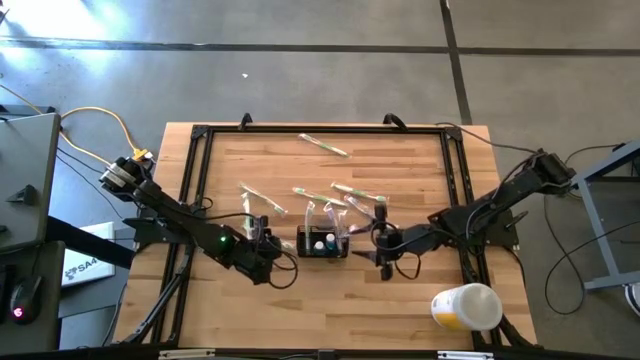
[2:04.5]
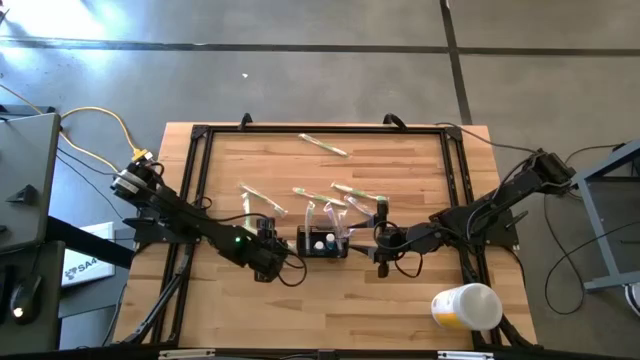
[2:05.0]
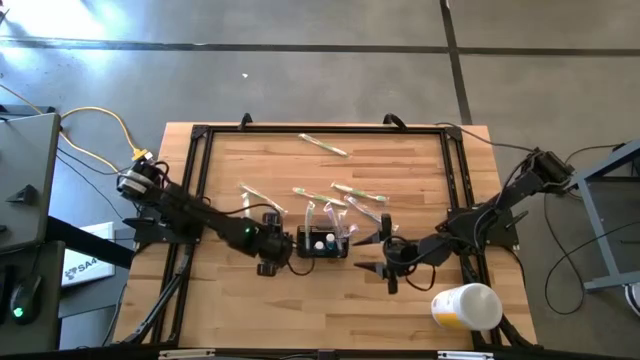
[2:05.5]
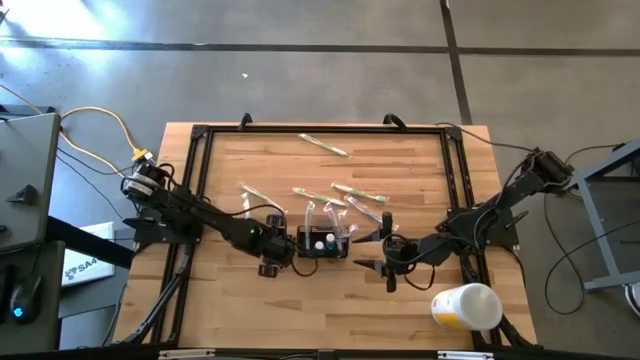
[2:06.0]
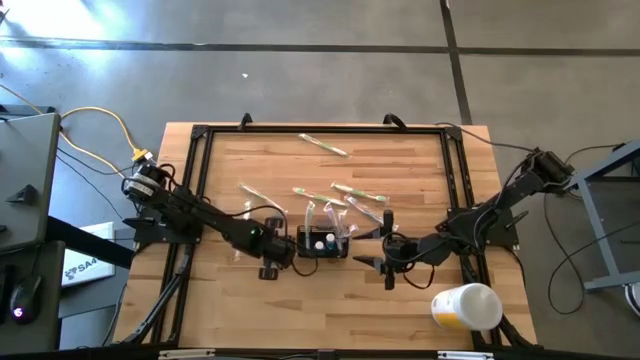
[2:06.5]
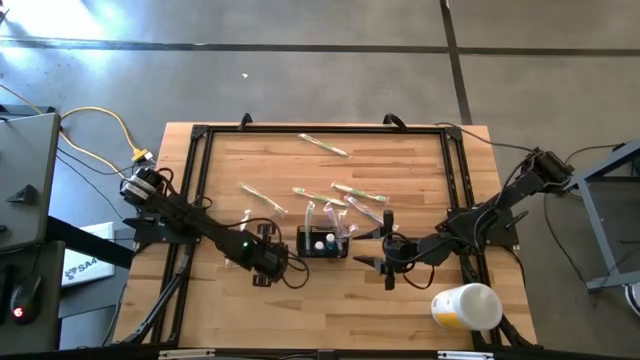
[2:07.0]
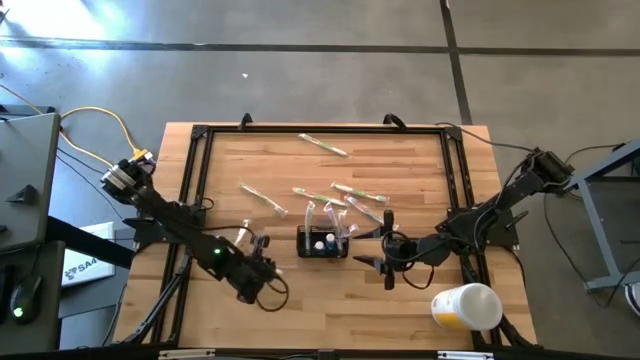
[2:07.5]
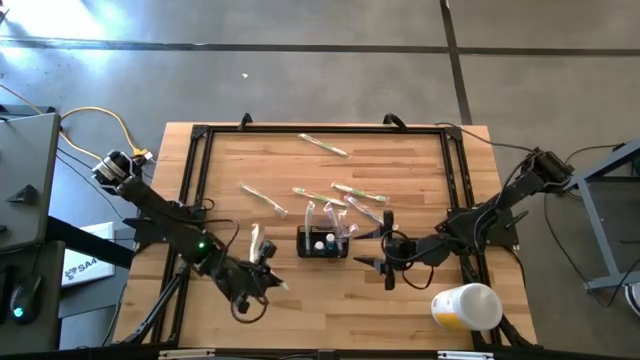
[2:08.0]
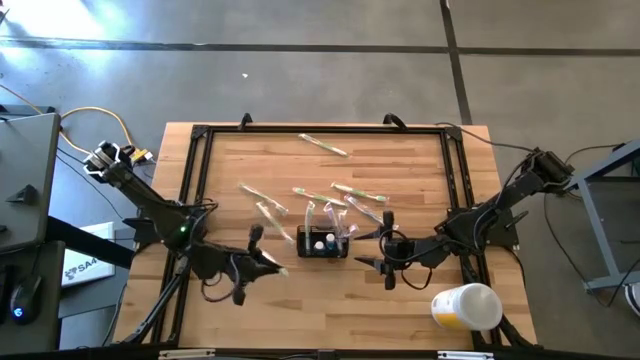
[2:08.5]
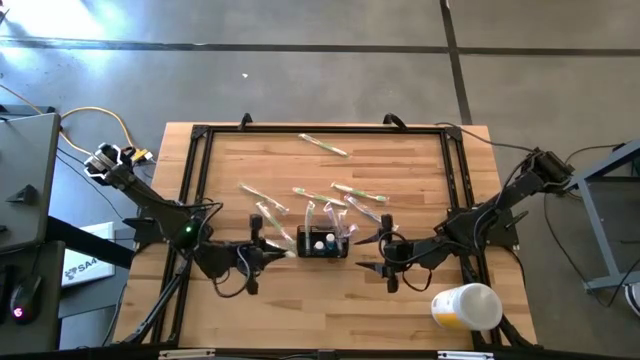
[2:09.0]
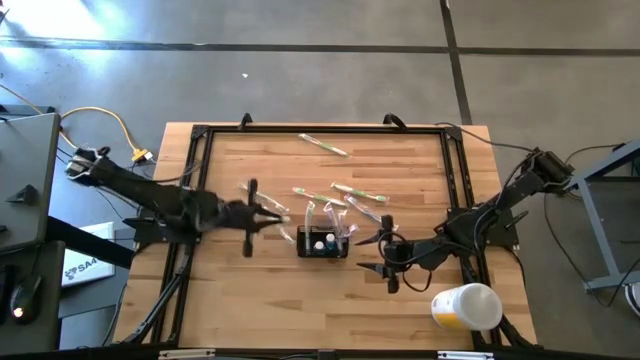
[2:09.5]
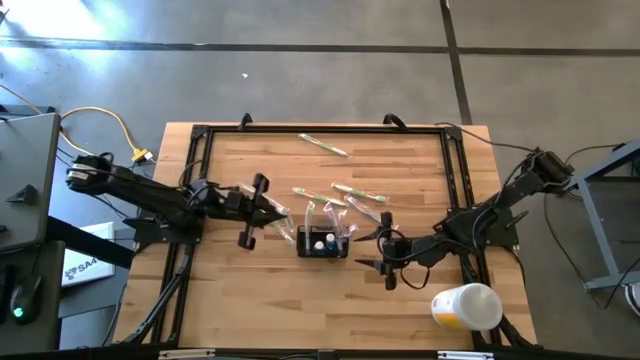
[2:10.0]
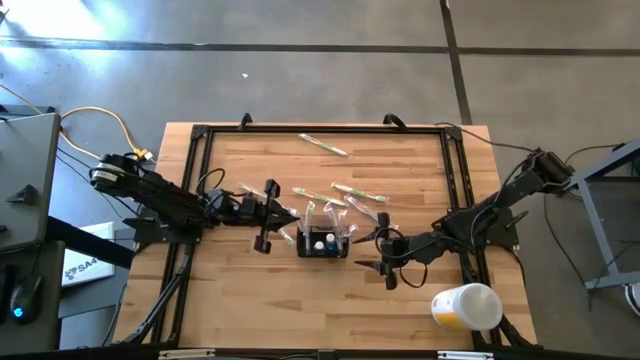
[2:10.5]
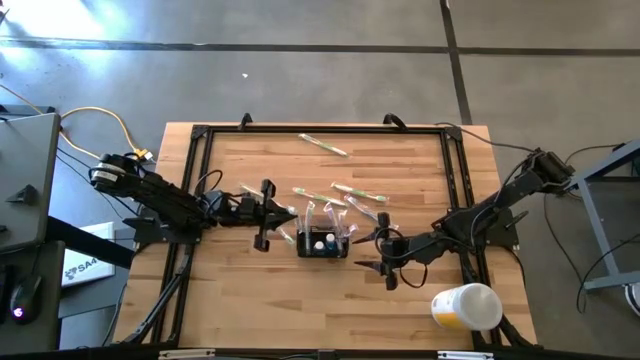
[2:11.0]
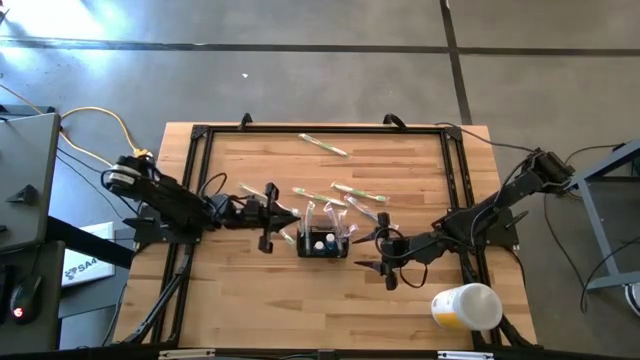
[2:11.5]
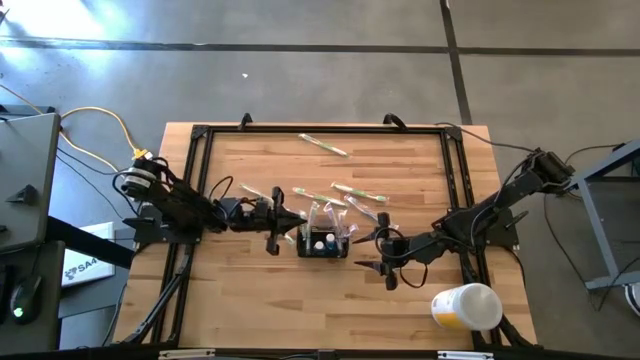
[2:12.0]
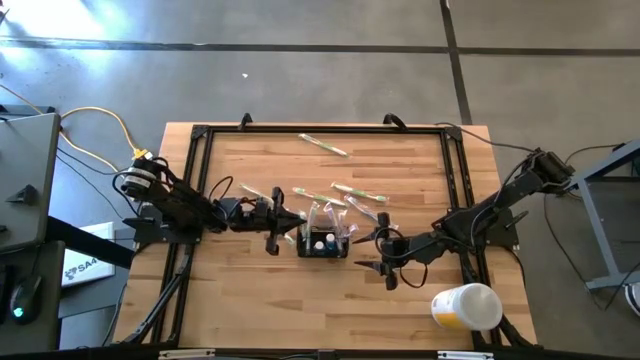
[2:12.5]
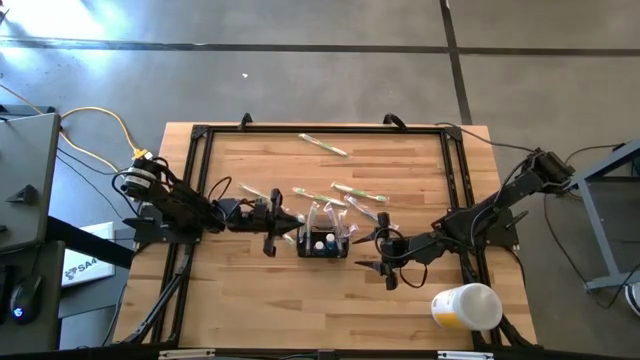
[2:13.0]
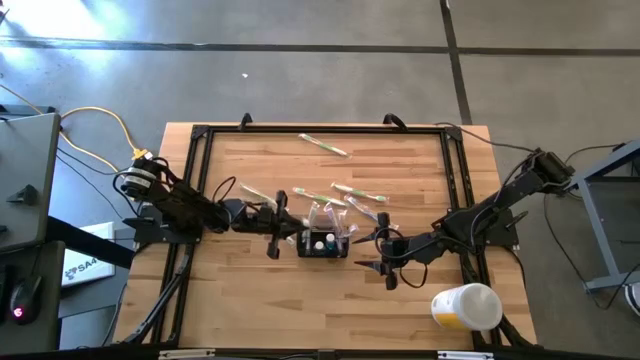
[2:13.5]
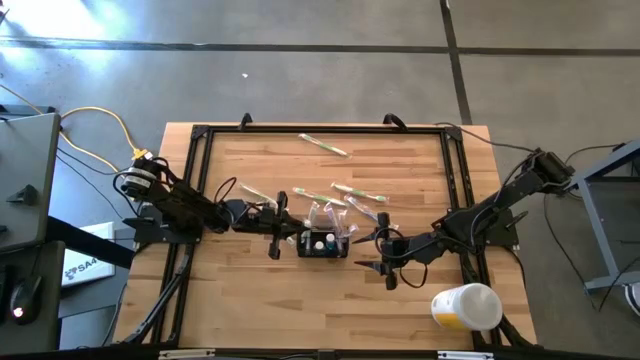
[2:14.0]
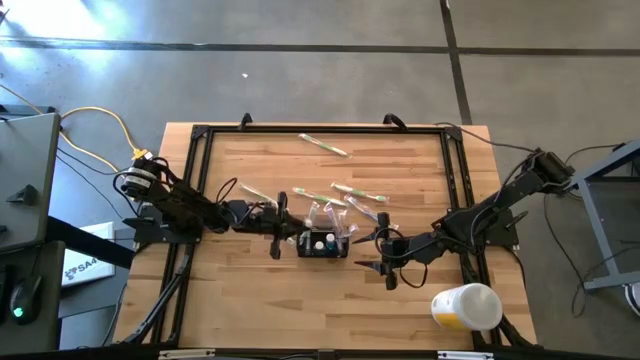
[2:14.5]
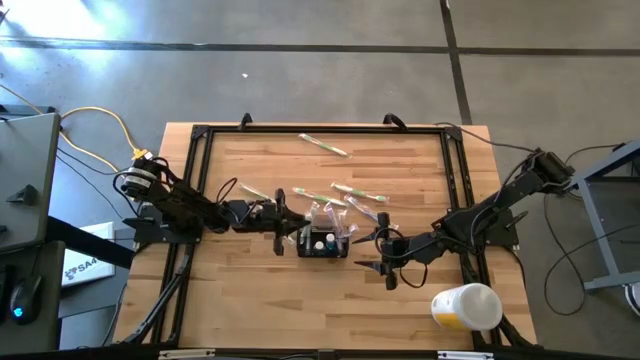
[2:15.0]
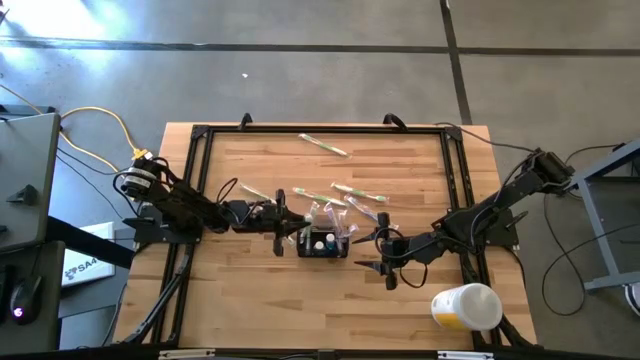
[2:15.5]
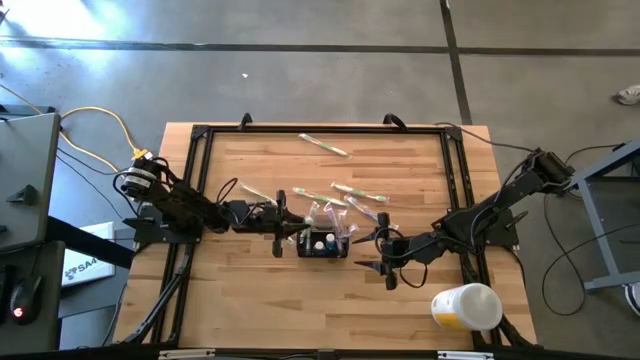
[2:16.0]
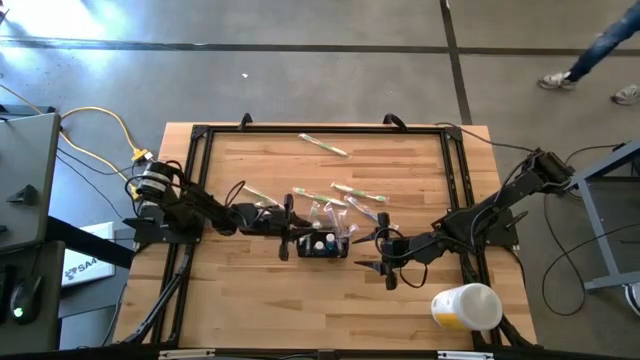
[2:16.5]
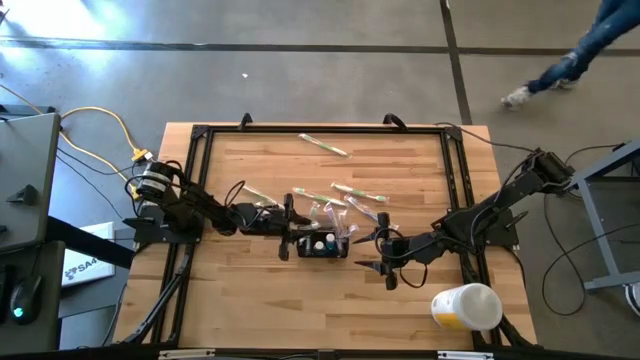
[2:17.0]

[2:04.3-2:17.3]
Task: Pick & Place toothbrushing station
Put the green toothbrush into the wire organizer

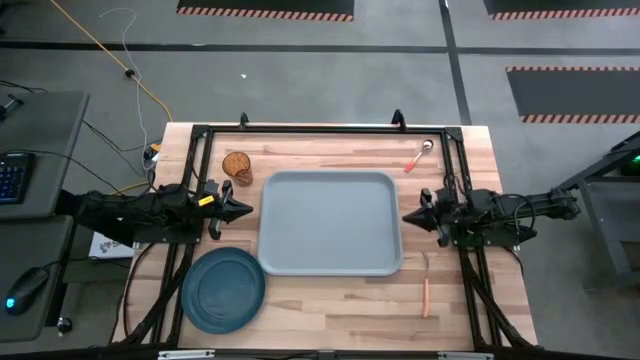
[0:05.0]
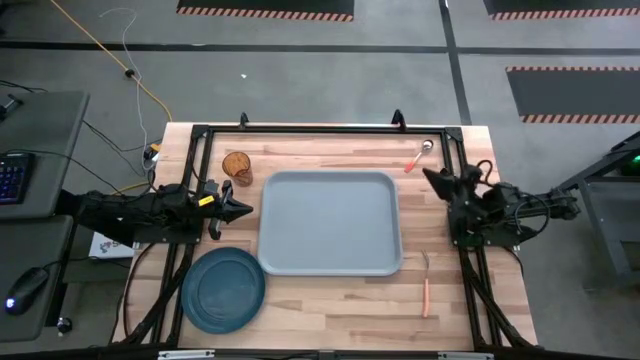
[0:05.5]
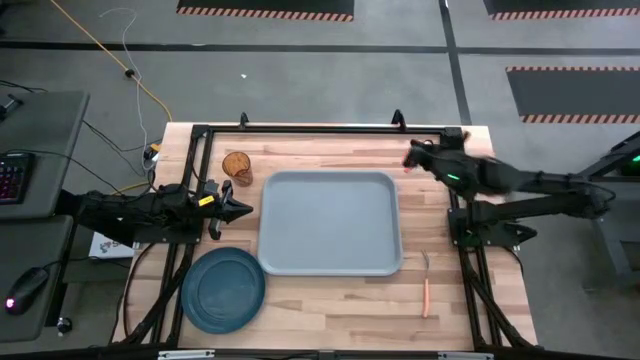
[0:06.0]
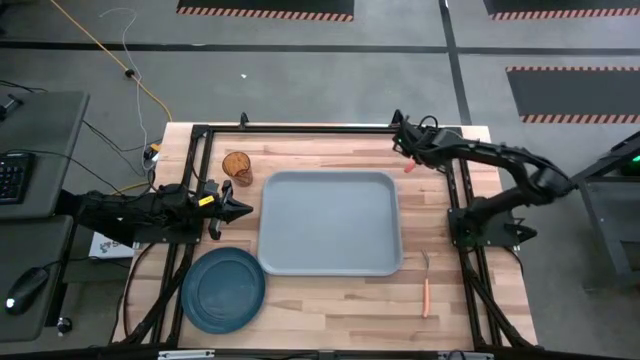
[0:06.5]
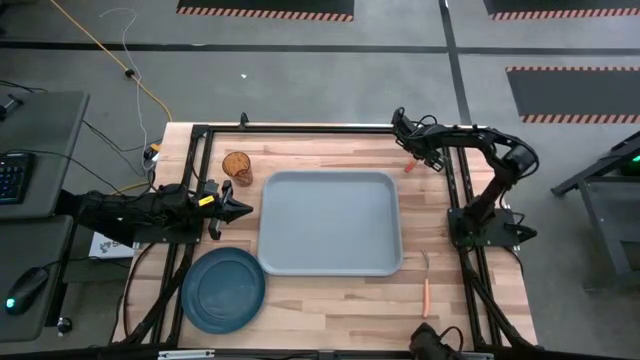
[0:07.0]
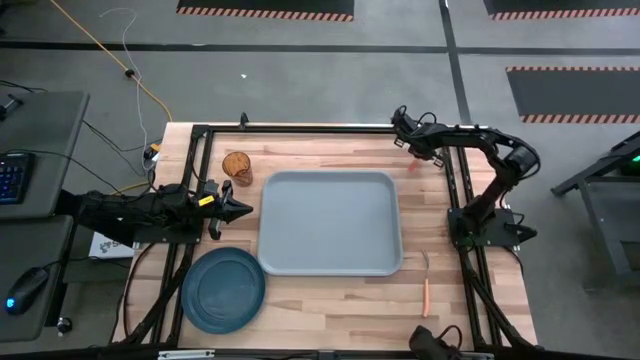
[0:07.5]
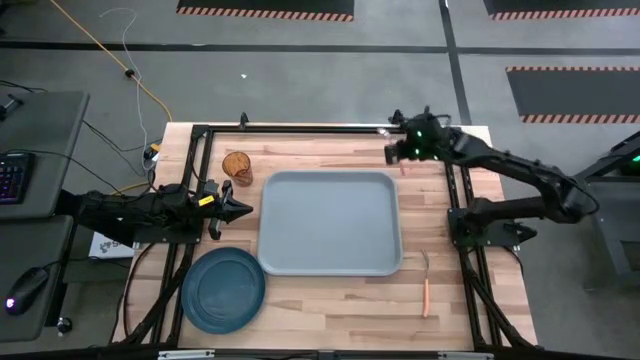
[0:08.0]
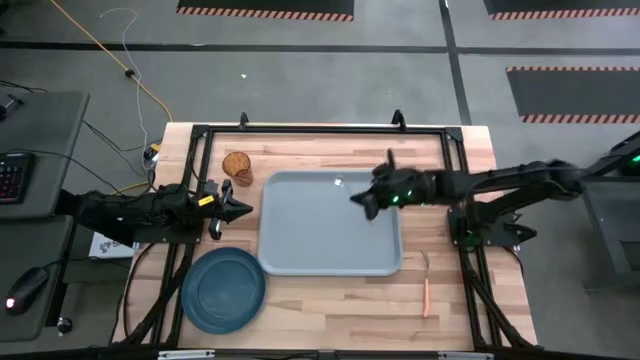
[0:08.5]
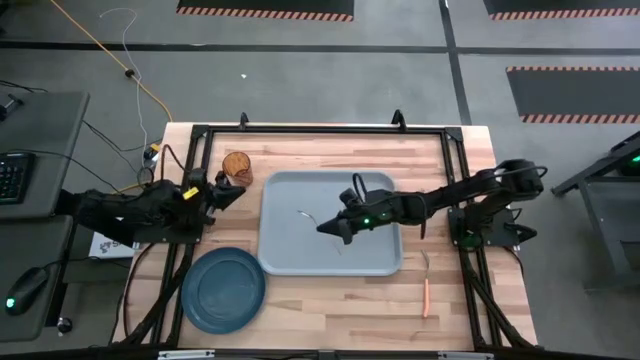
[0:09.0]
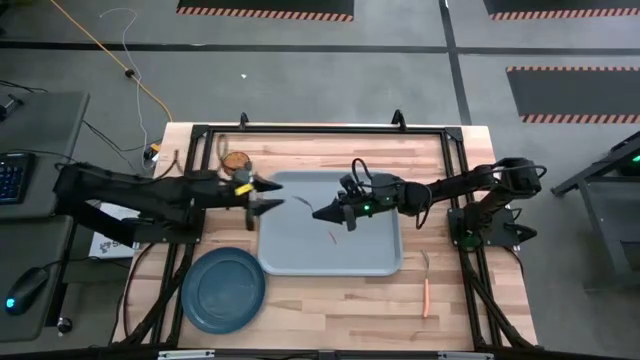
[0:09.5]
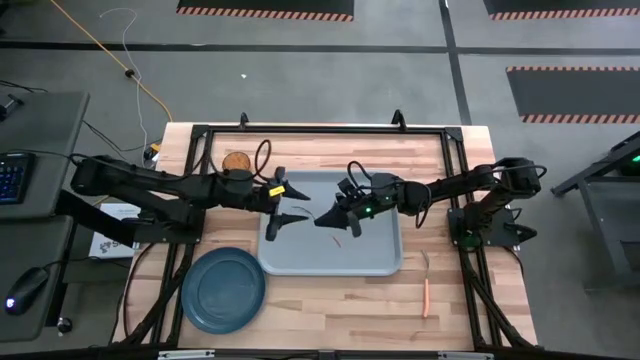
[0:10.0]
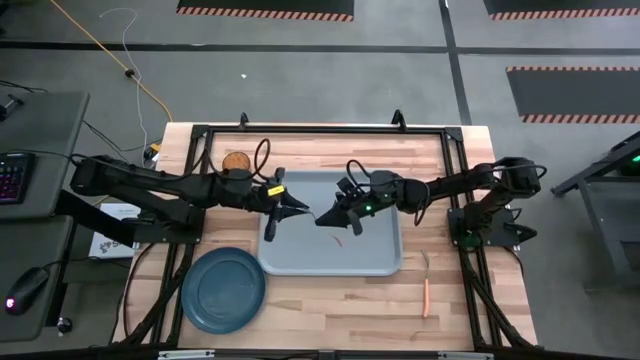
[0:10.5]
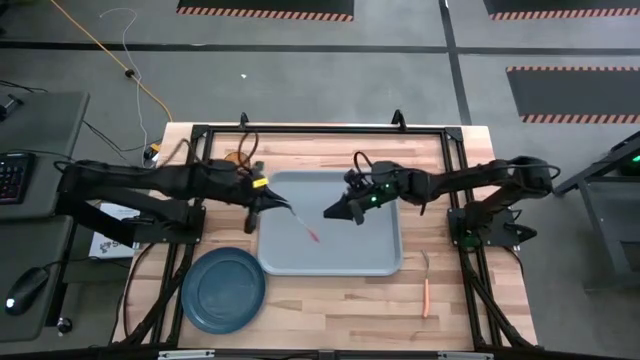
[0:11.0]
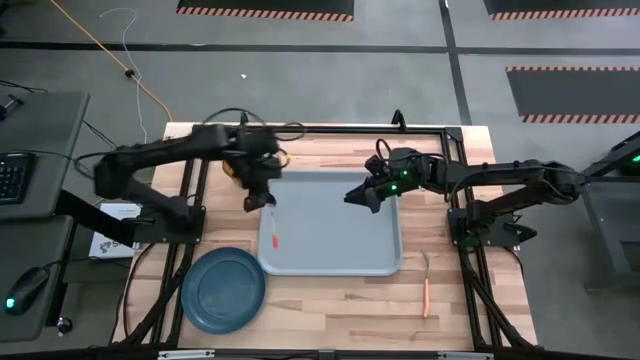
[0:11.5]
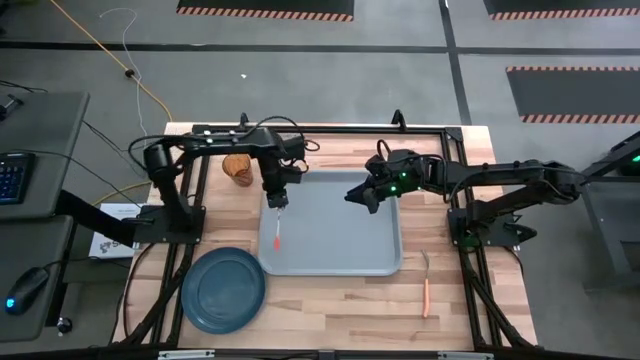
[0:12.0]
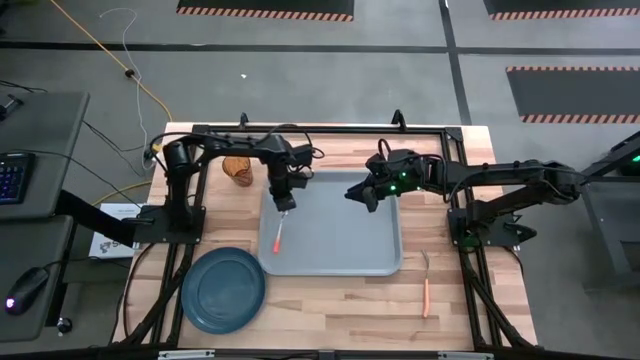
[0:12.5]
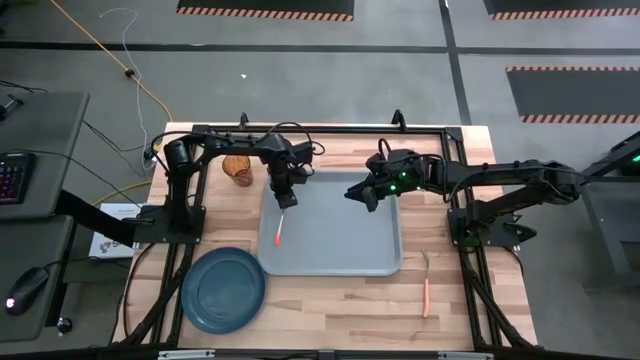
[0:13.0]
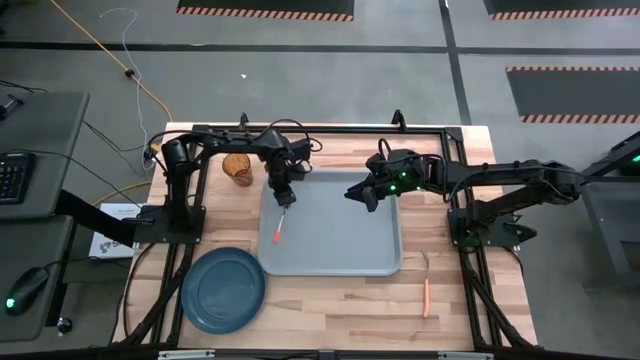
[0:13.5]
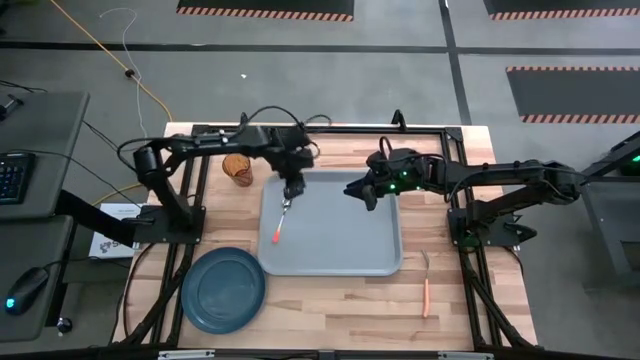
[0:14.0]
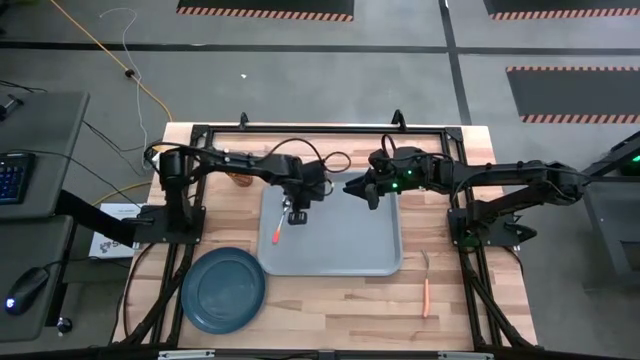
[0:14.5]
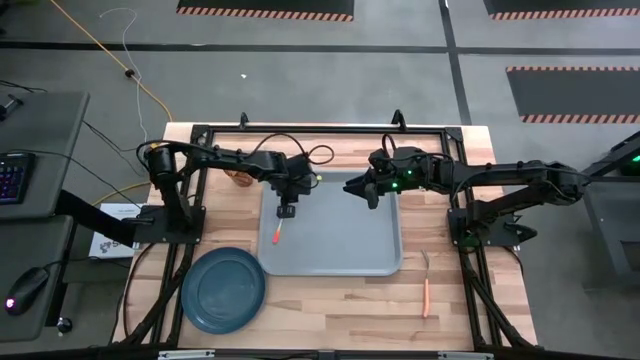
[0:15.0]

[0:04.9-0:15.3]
Task: Pick and place plate/cup/fork/spoon on tray
Put the orange spoon on the gray tray
